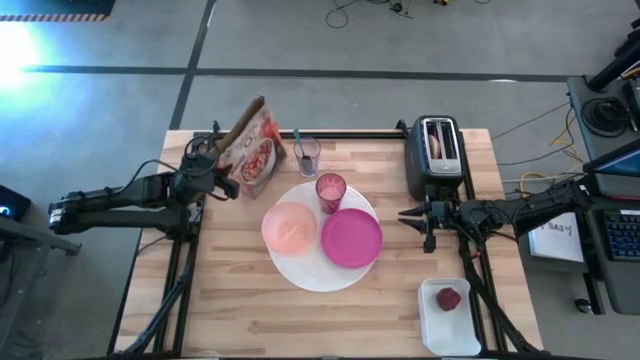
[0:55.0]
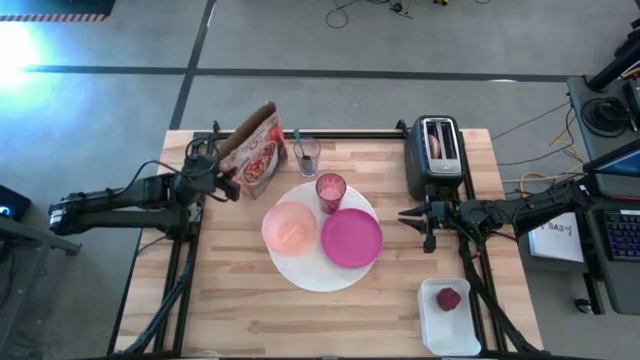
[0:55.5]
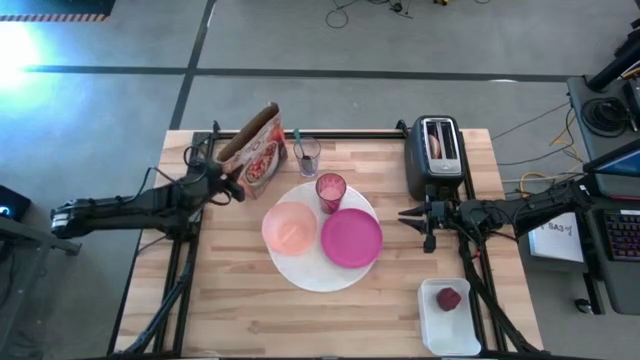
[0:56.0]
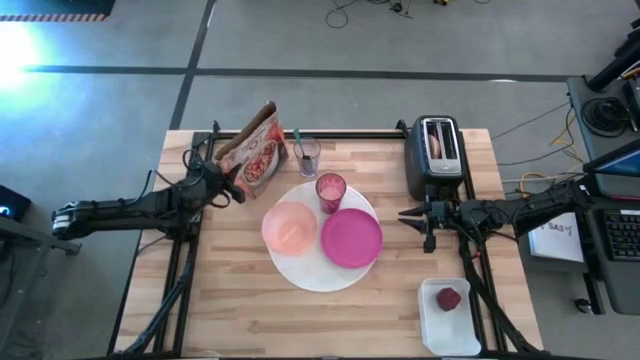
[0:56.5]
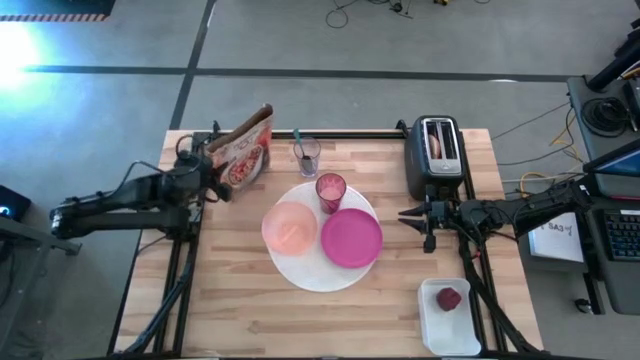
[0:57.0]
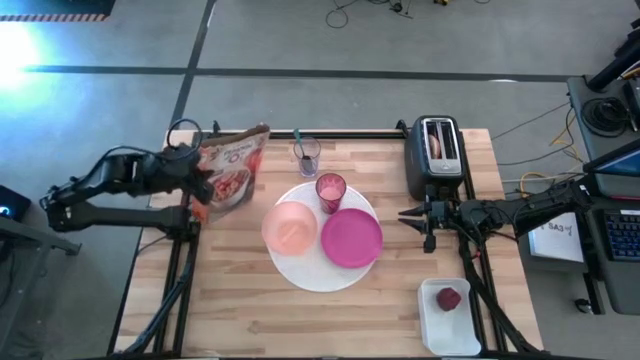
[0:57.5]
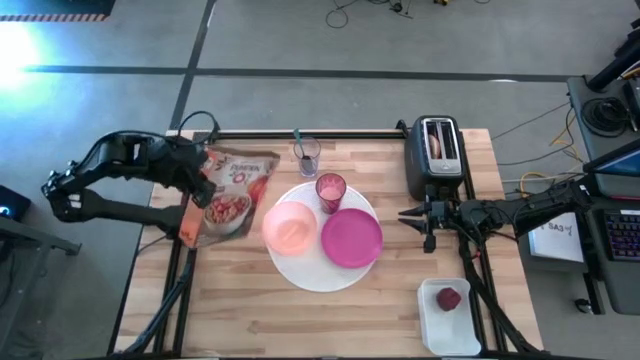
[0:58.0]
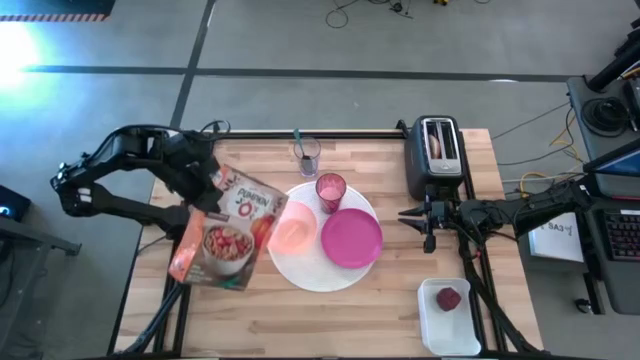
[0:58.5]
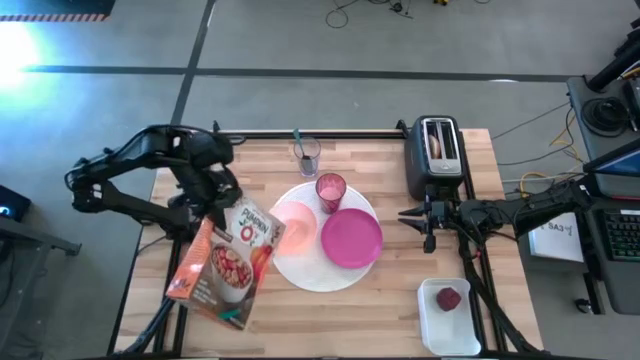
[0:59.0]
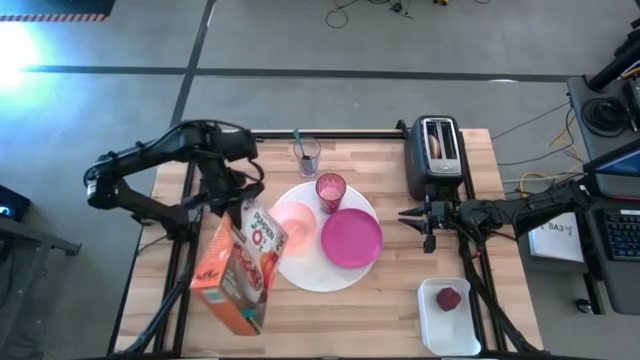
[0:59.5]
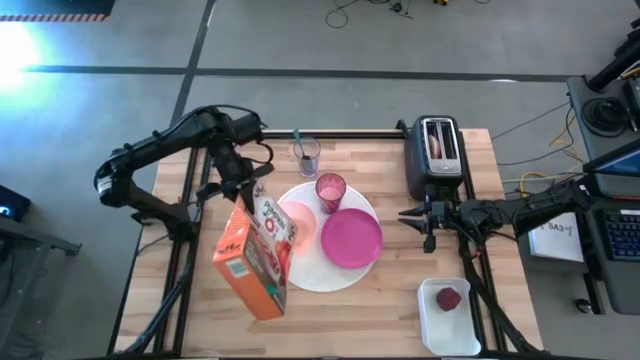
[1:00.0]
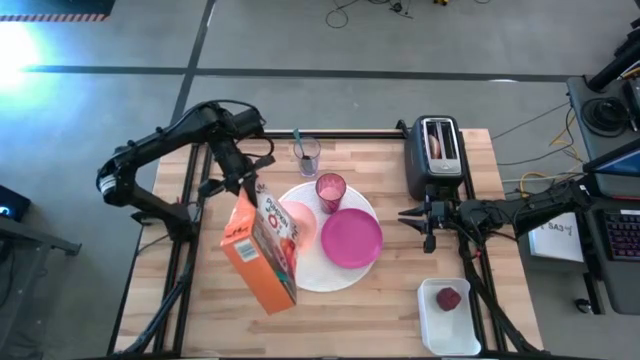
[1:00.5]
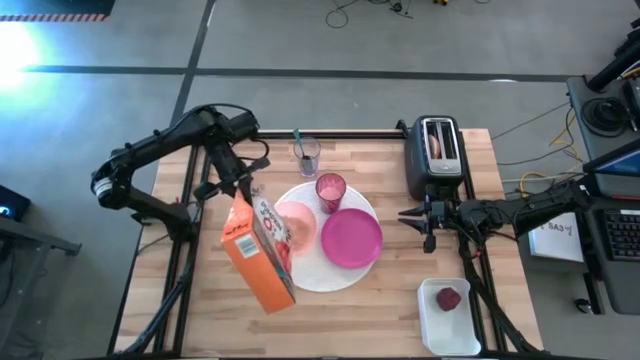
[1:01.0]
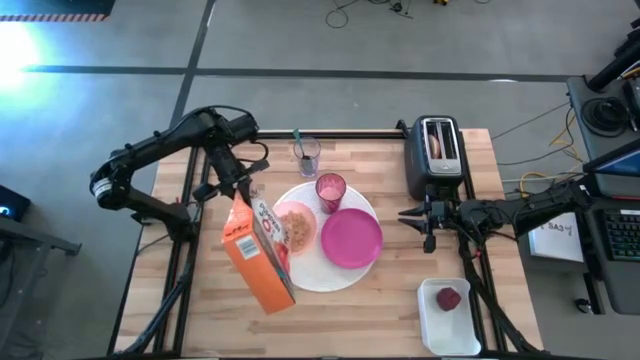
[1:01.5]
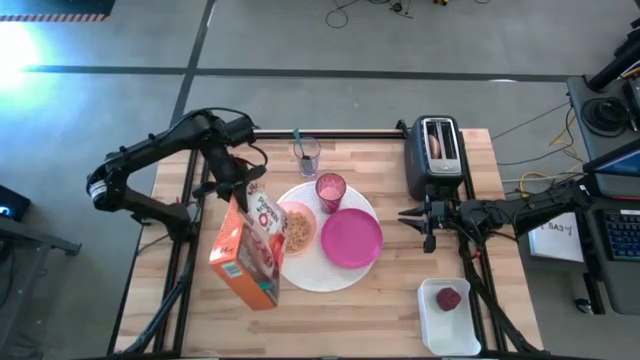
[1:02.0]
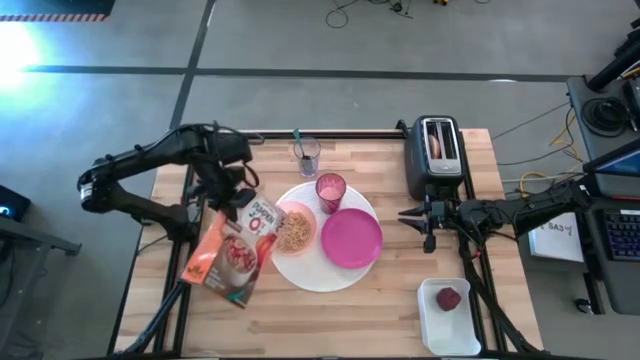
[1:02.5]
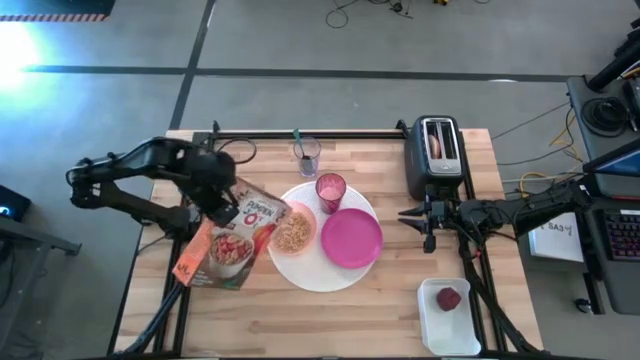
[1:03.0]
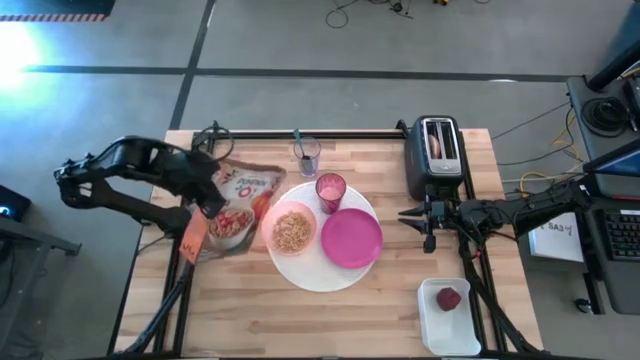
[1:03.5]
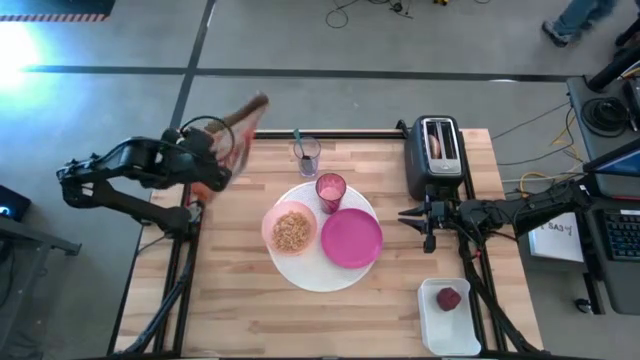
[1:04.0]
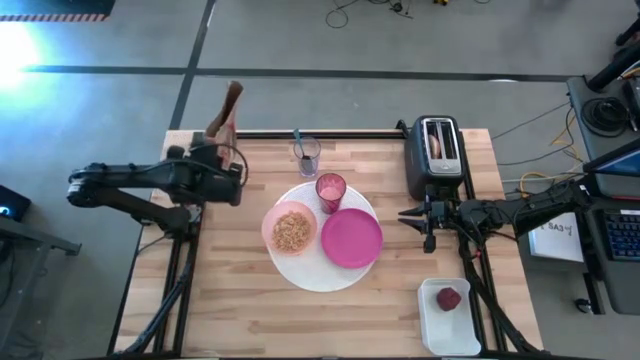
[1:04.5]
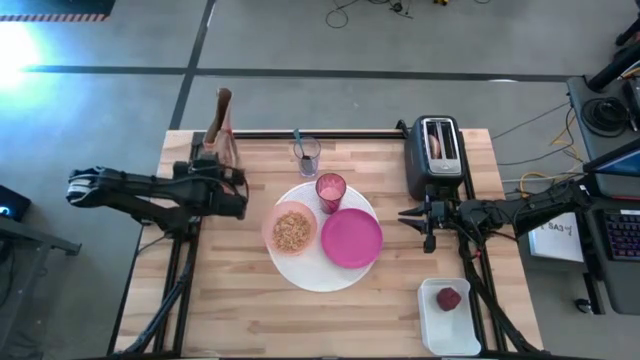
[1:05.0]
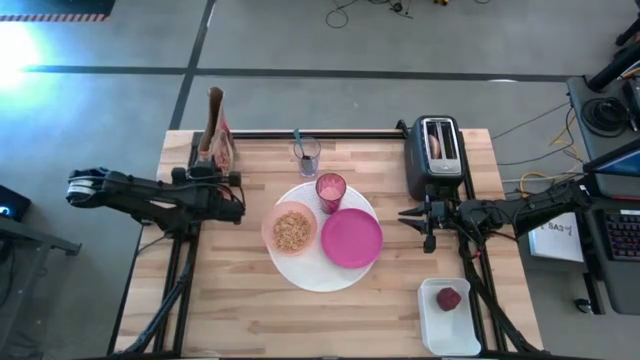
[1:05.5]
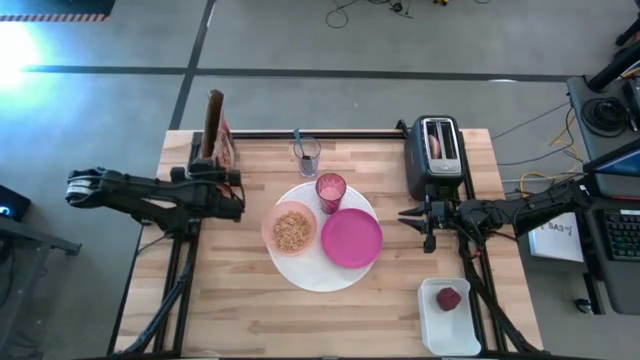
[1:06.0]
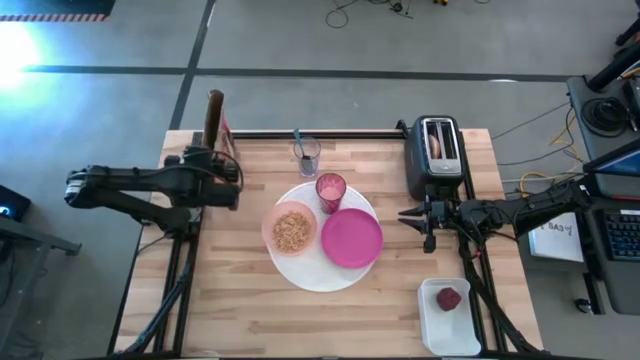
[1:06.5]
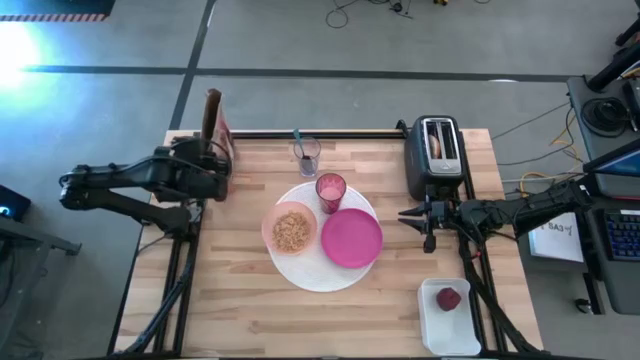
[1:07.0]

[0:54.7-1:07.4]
Task: Arrange a breakfast setting
Pour the cereal into the orange bowl

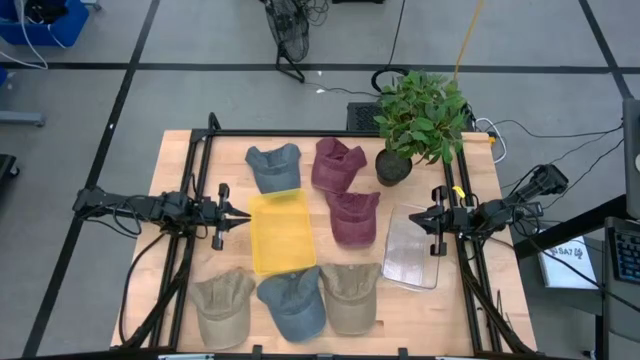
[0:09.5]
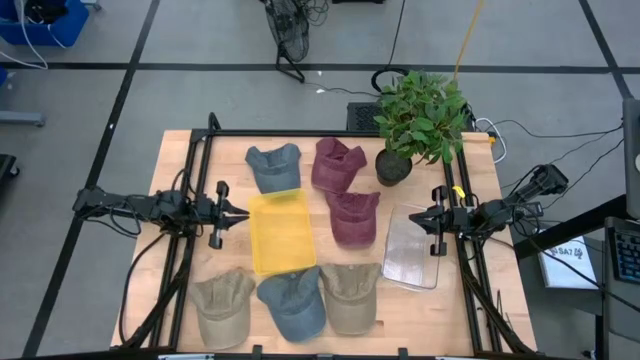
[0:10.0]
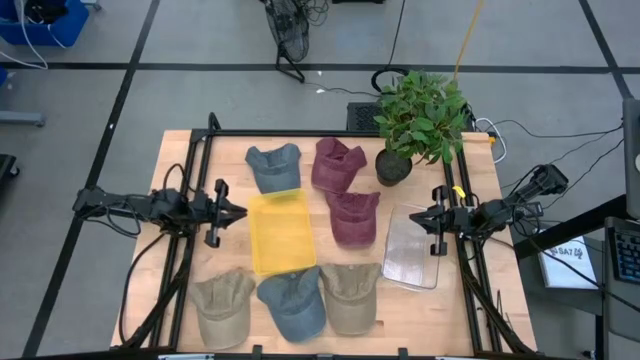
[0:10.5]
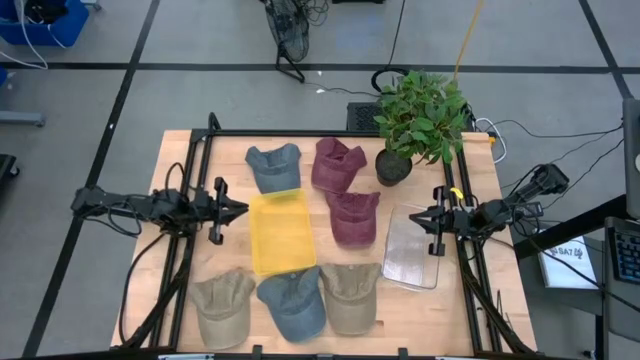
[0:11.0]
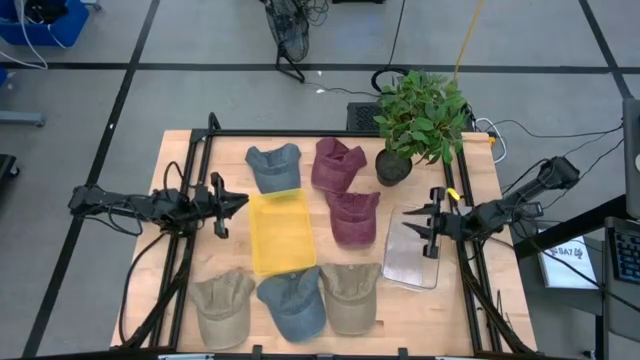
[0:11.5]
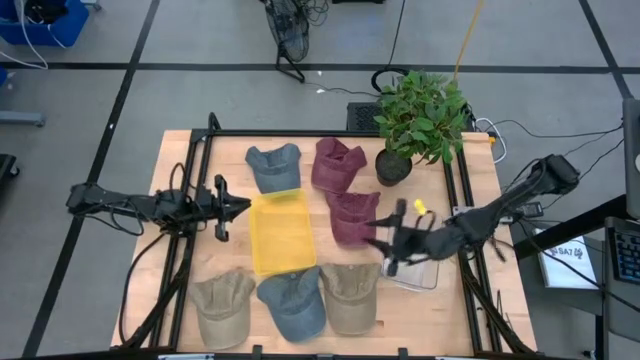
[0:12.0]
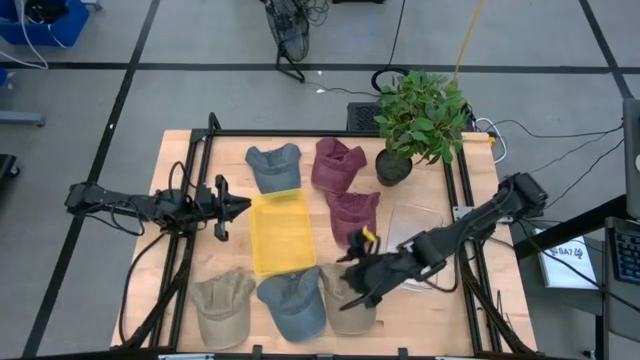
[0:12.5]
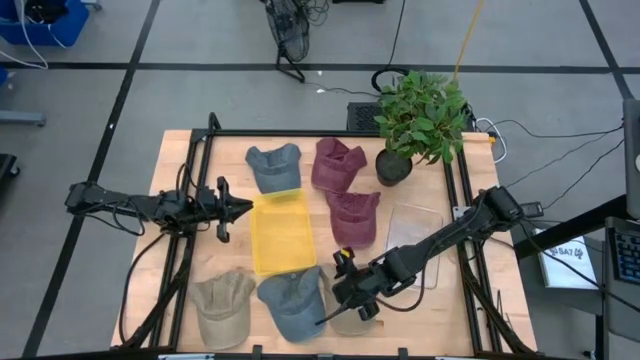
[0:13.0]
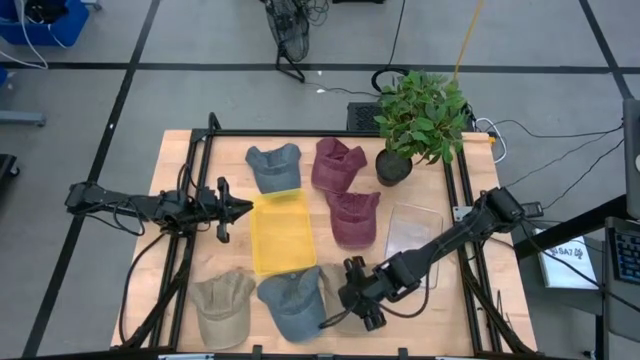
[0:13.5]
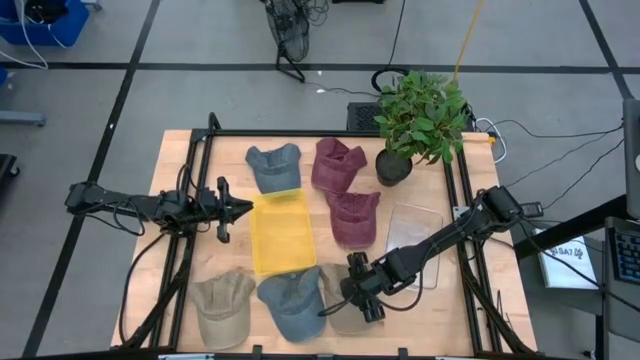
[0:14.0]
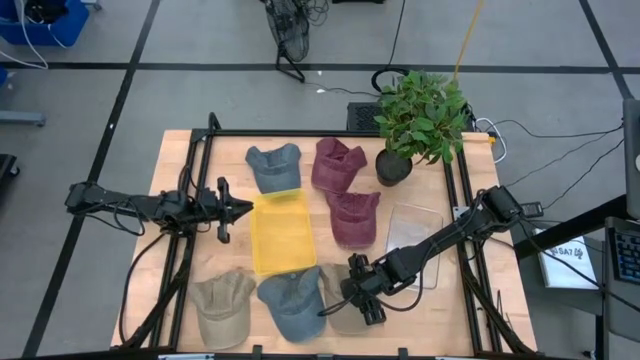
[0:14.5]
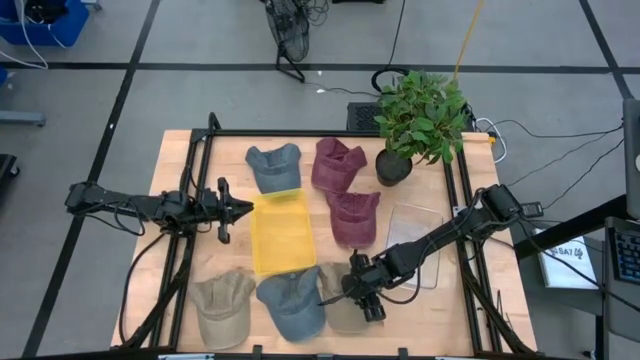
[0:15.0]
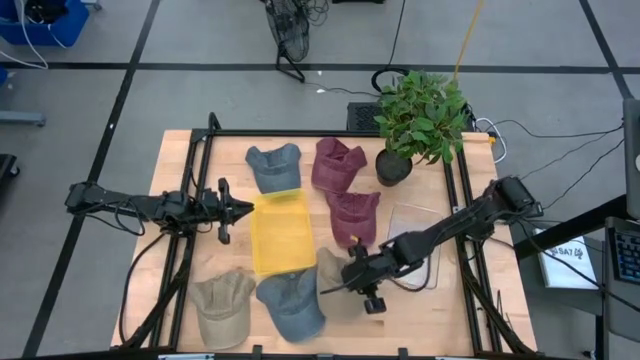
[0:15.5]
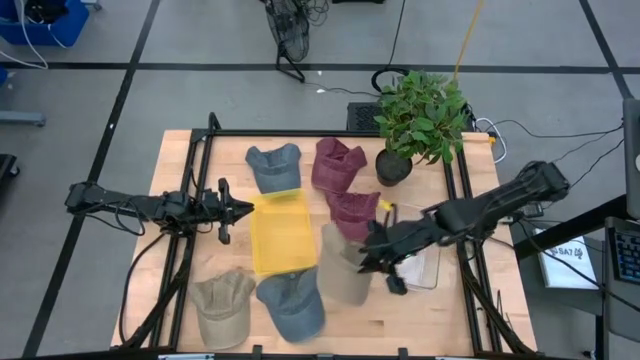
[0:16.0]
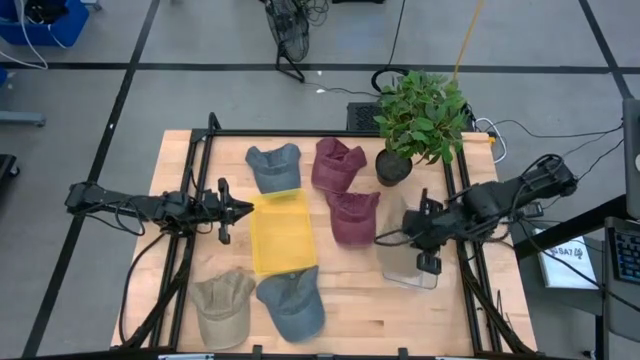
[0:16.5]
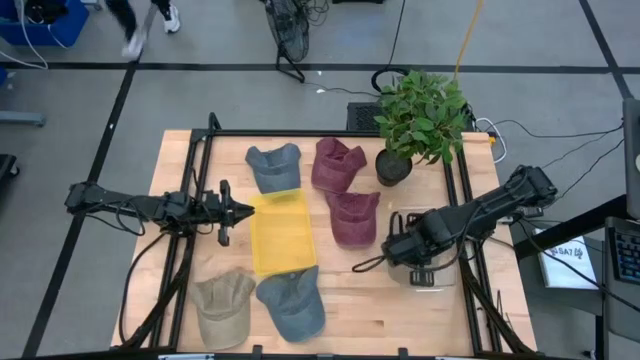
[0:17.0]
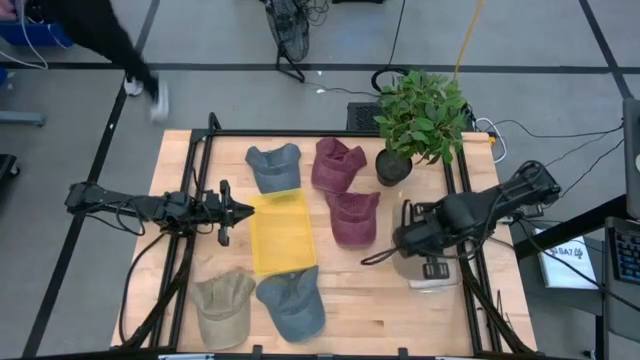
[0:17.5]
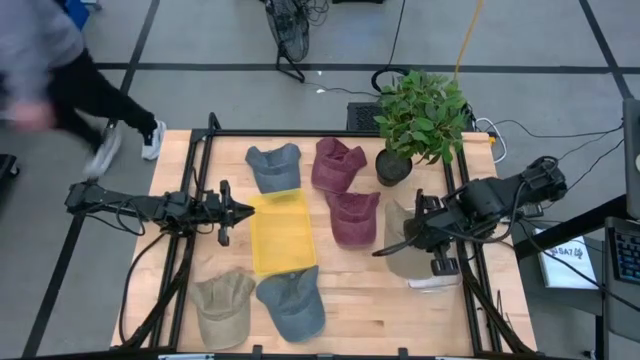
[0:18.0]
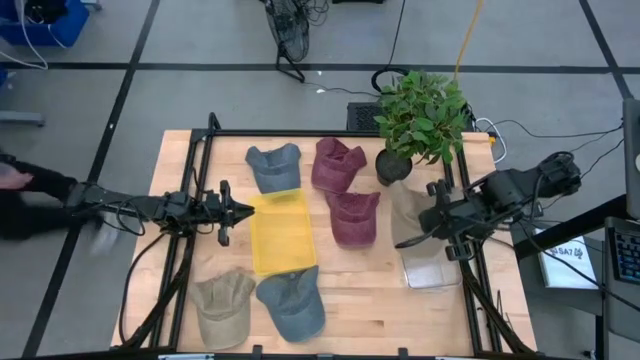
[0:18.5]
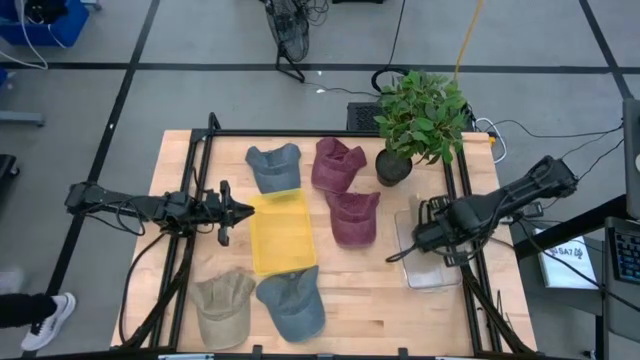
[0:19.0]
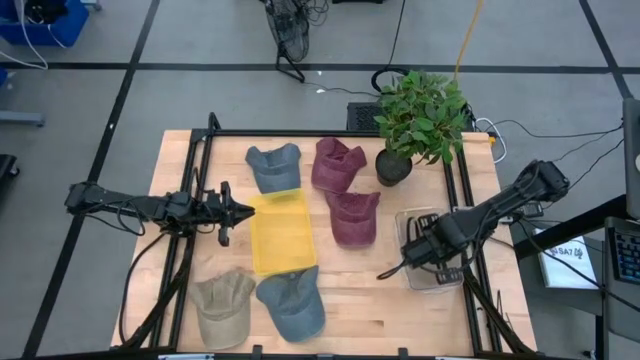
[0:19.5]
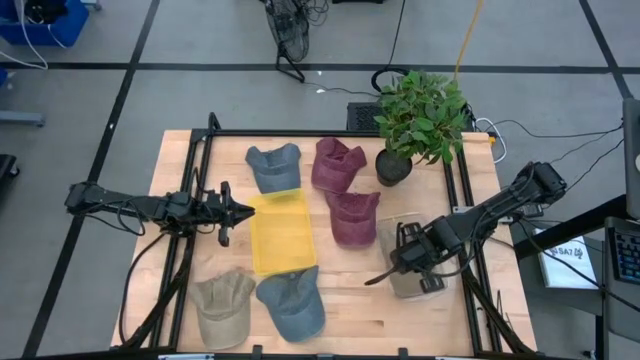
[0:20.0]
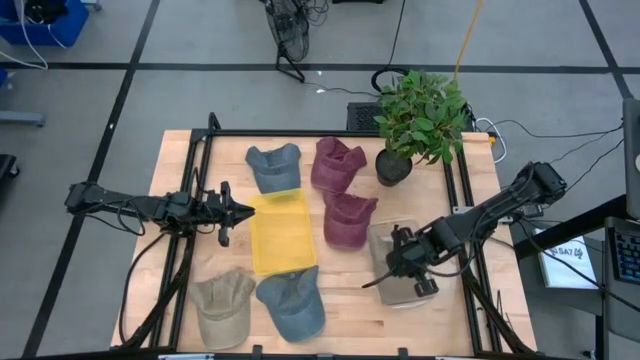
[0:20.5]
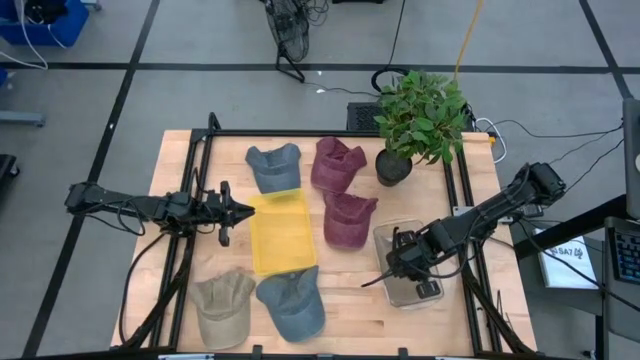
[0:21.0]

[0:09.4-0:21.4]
Task: Pick & Place hat
Put the right brown cap into the transparent bin
